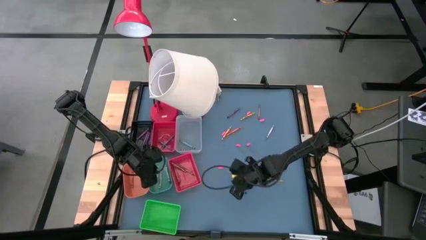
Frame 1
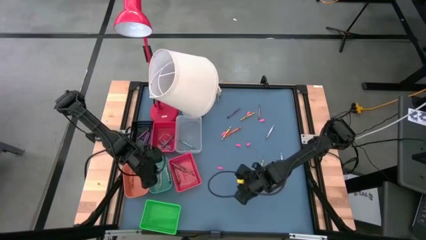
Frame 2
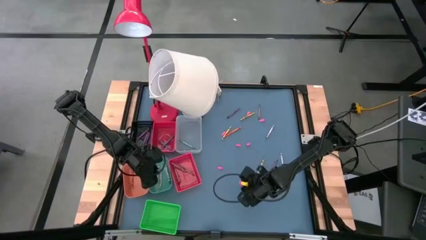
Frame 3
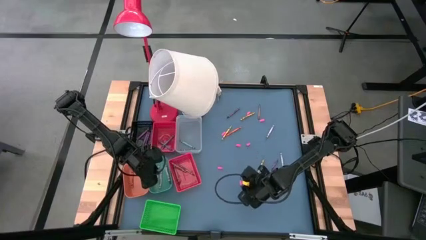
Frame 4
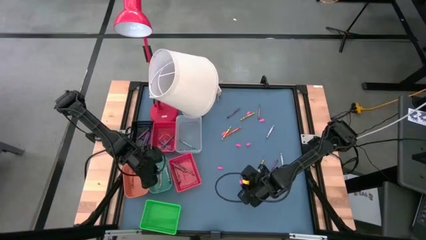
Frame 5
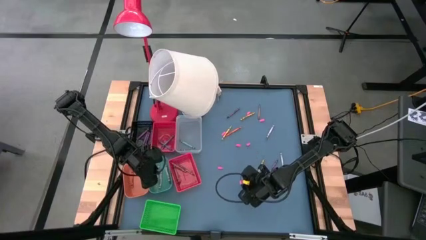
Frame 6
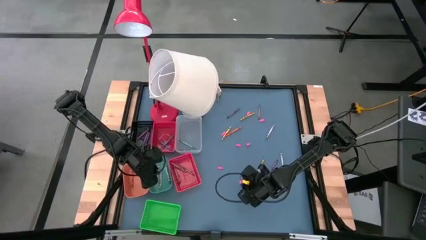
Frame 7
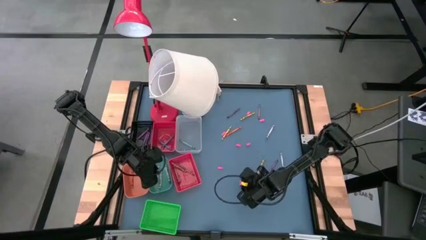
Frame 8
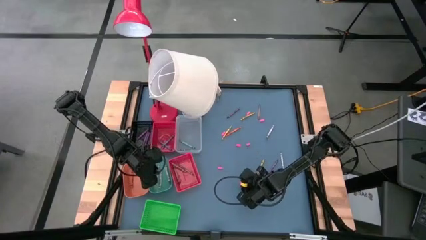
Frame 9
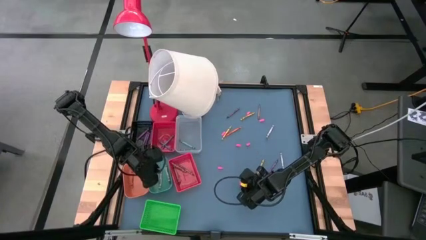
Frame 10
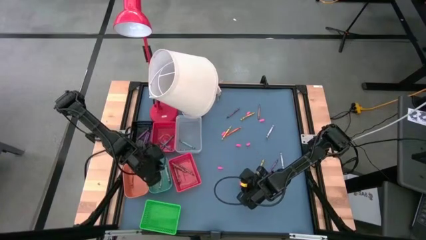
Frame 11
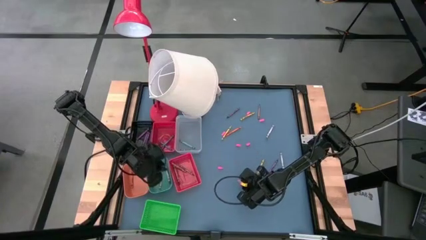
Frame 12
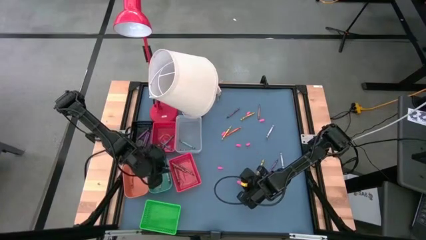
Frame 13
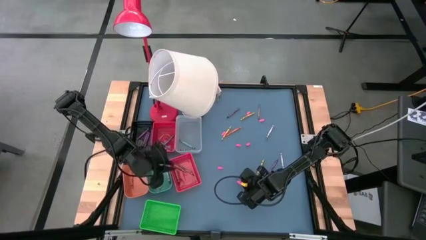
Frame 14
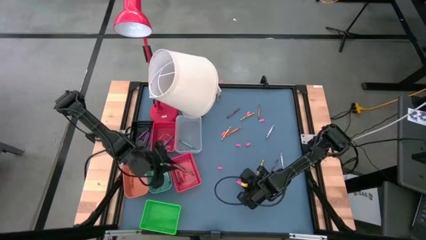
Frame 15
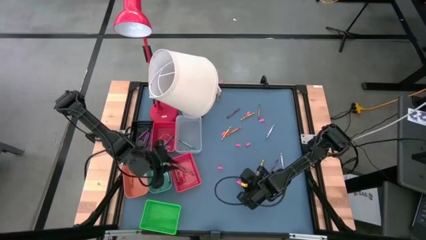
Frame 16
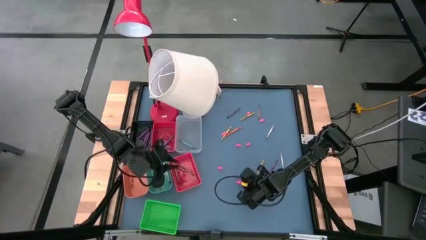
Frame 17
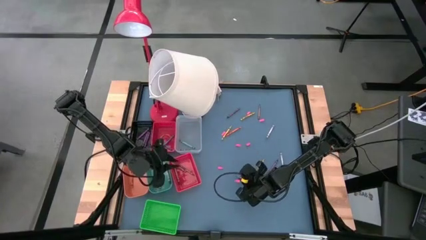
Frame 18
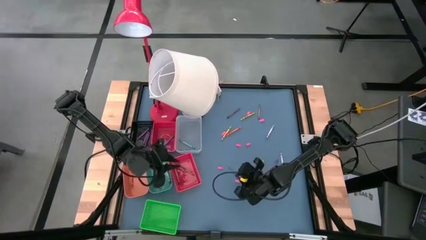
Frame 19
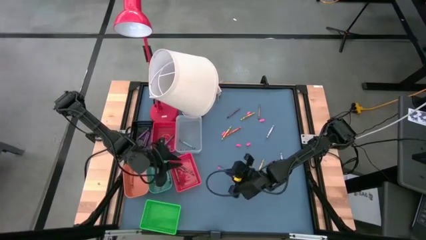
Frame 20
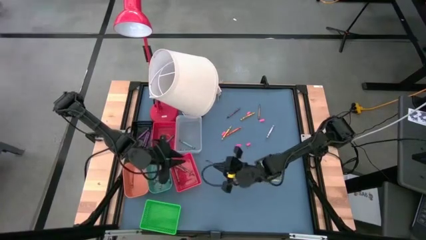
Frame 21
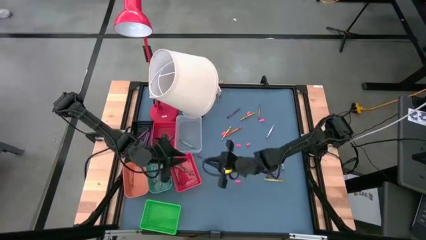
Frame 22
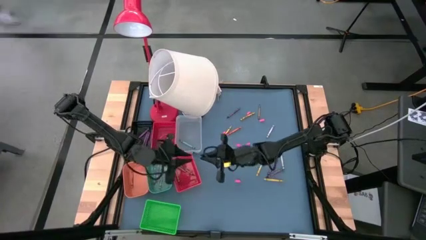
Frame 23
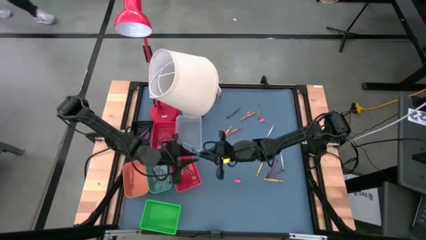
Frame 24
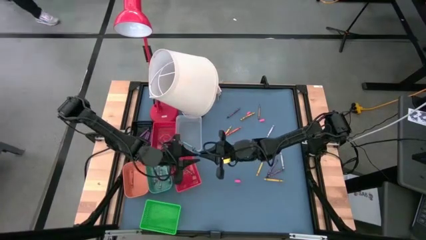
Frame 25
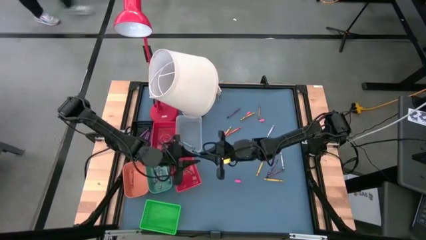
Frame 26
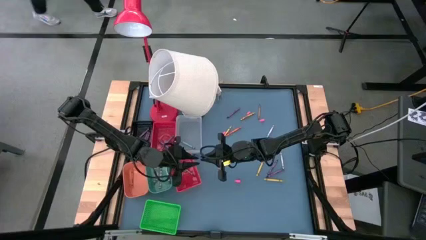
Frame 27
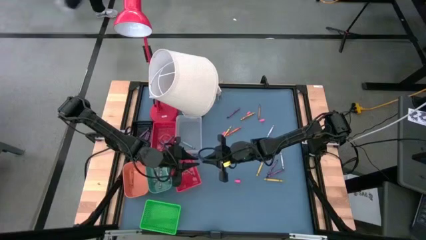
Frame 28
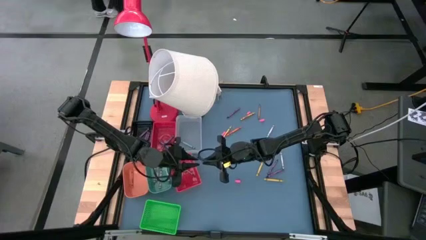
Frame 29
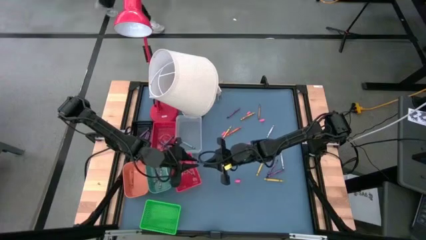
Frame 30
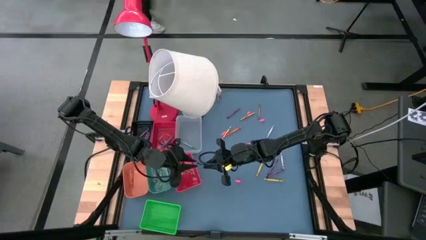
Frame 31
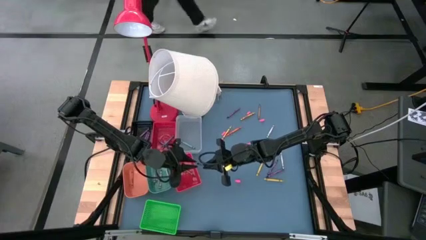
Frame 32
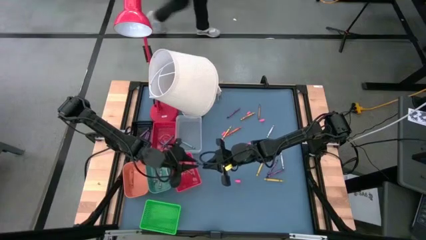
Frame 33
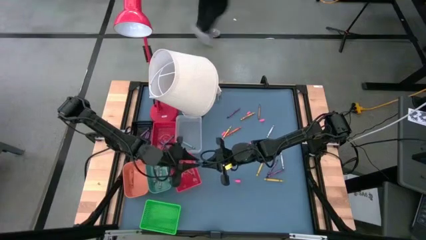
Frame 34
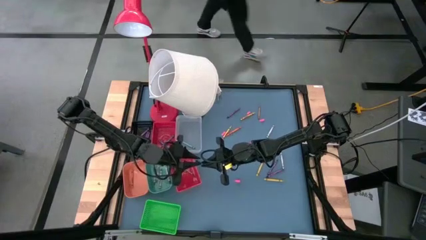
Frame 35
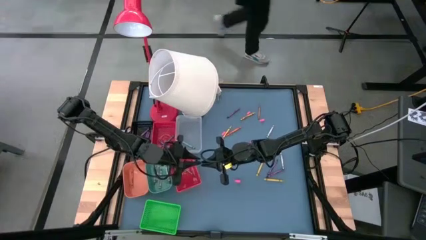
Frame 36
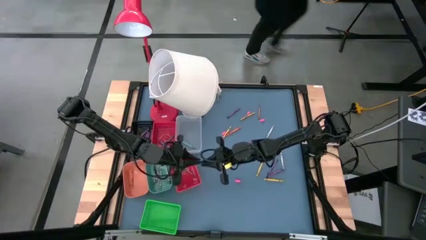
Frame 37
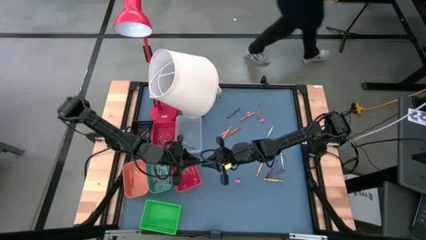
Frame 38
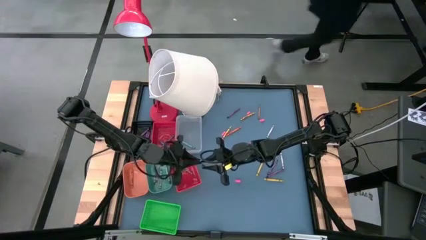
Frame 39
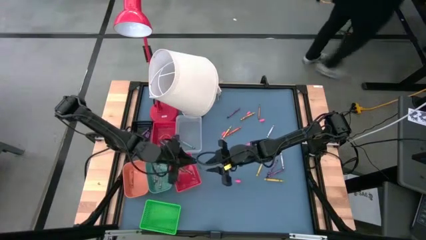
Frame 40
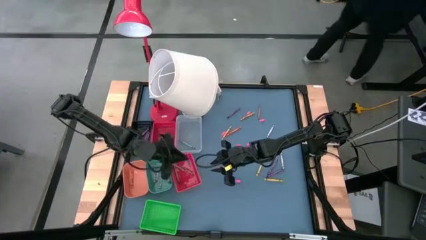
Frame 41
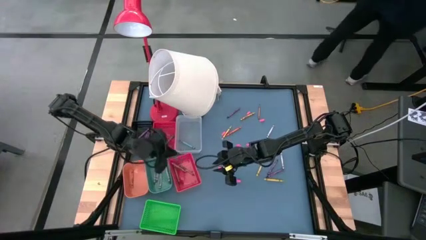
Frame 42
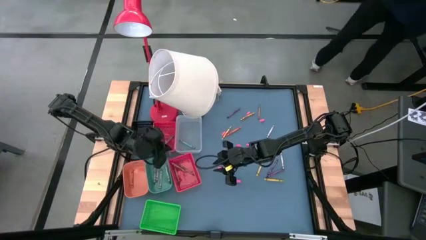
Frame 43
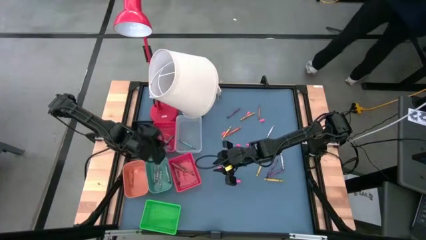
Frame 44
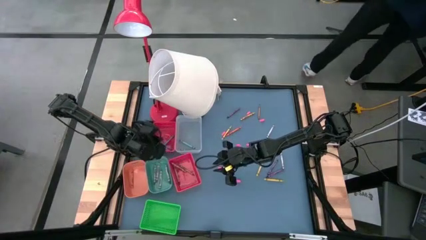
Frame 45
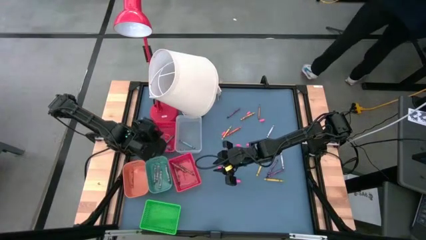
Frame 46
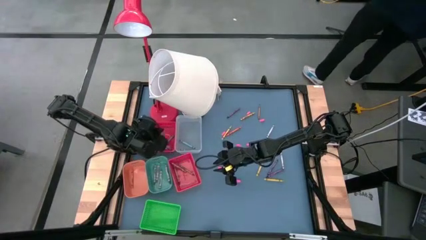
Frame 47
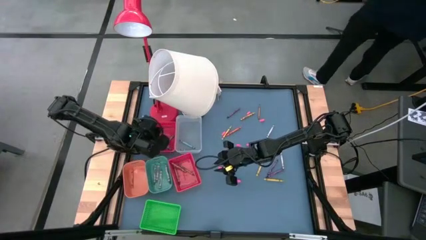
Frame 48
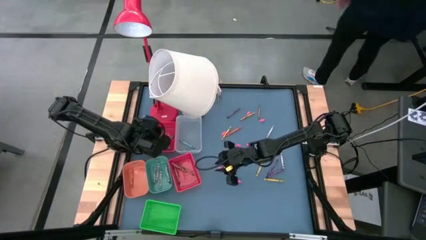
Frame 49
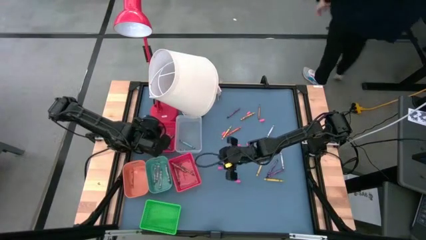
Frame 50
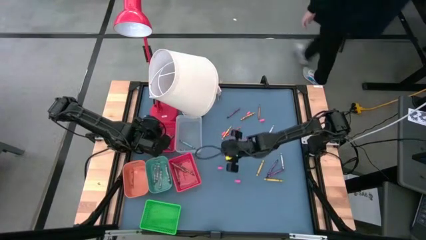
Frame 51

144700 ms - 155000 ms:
Task: Sort crayons
Put the blue crayon into the top red bin

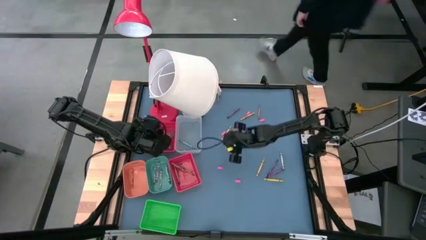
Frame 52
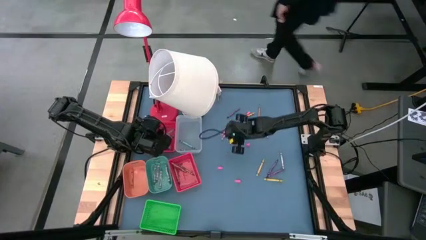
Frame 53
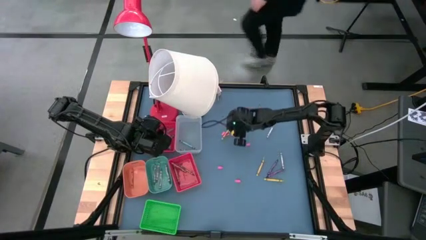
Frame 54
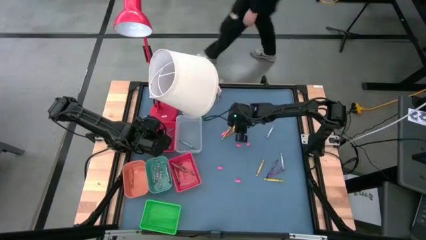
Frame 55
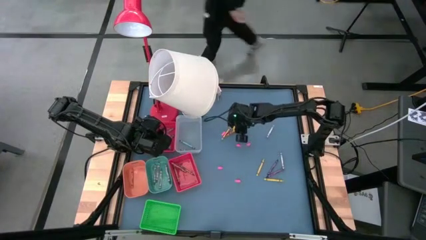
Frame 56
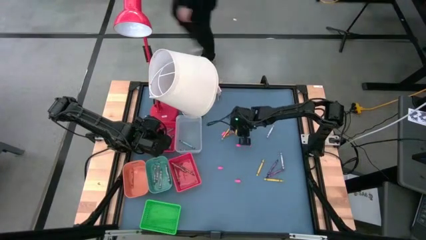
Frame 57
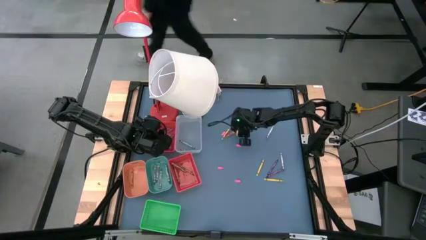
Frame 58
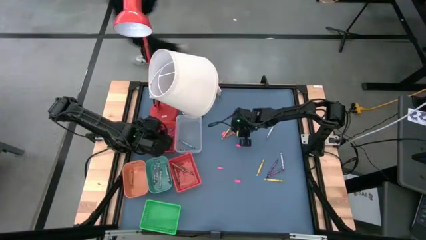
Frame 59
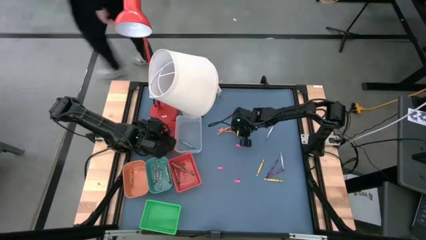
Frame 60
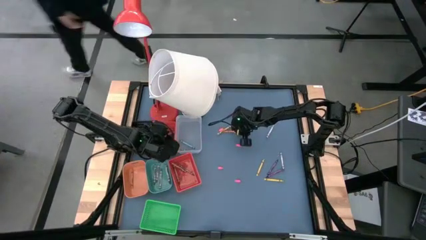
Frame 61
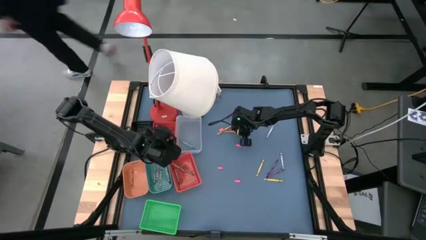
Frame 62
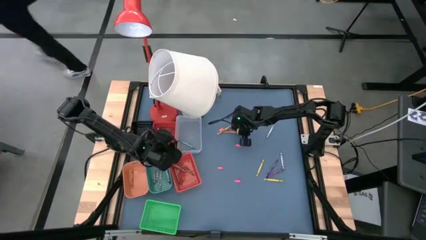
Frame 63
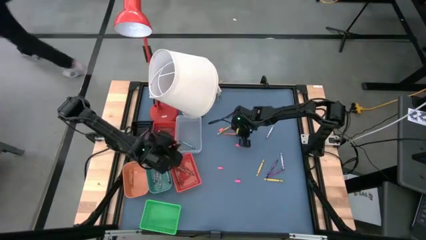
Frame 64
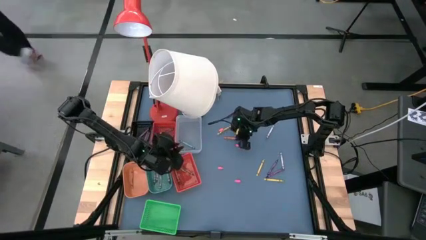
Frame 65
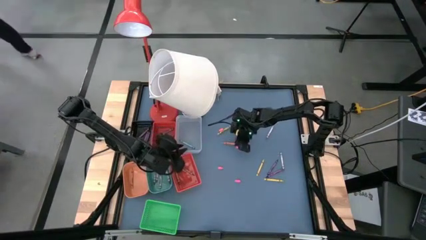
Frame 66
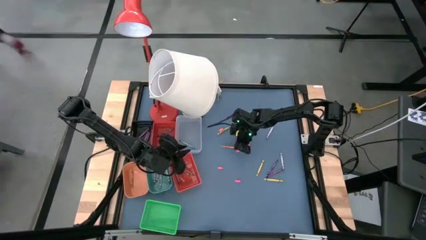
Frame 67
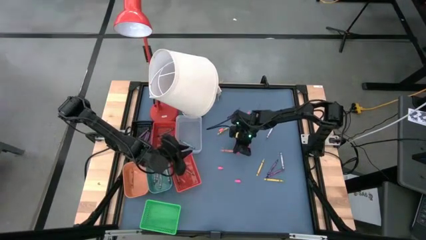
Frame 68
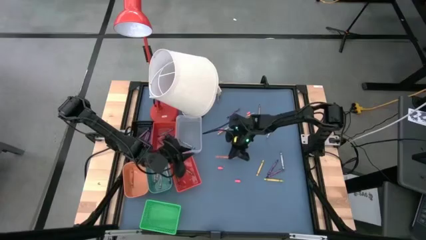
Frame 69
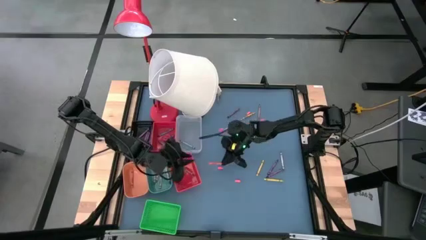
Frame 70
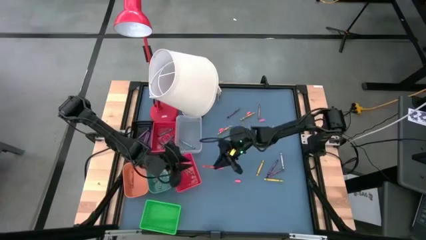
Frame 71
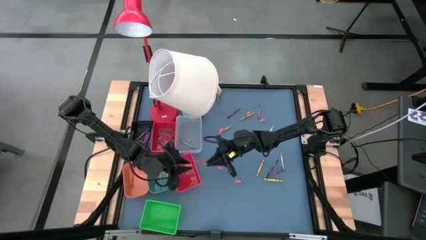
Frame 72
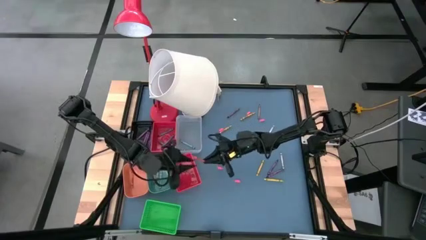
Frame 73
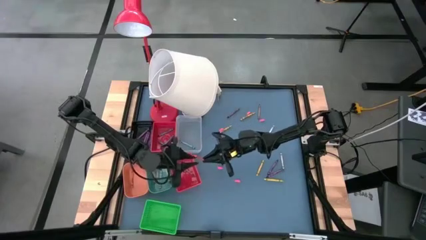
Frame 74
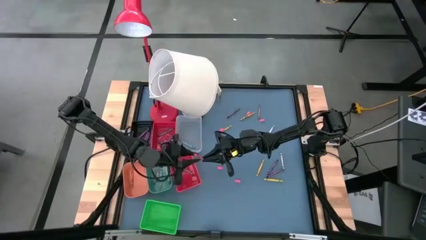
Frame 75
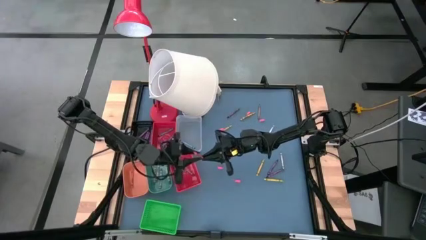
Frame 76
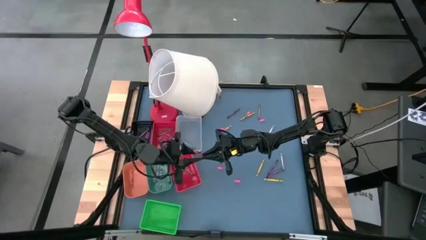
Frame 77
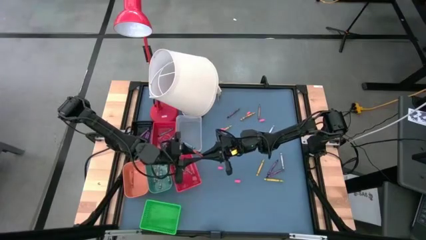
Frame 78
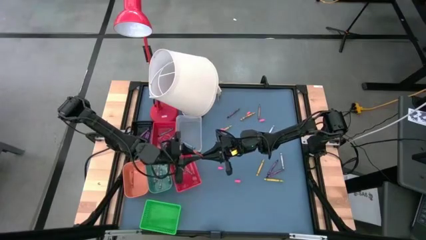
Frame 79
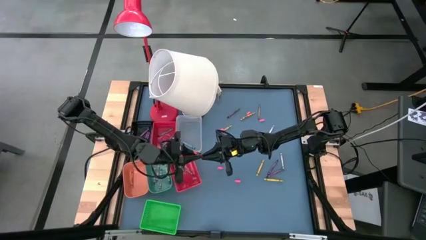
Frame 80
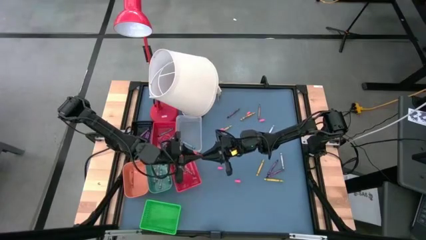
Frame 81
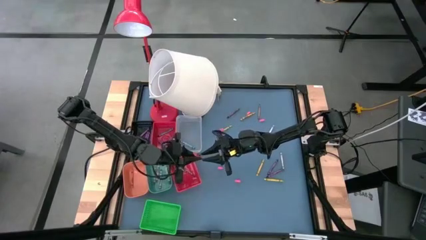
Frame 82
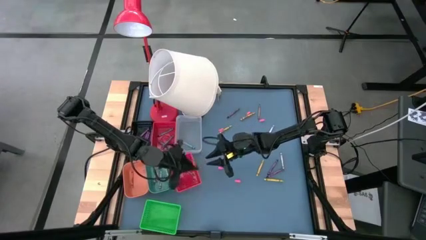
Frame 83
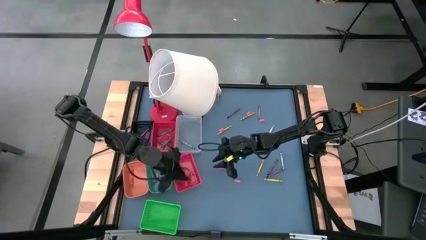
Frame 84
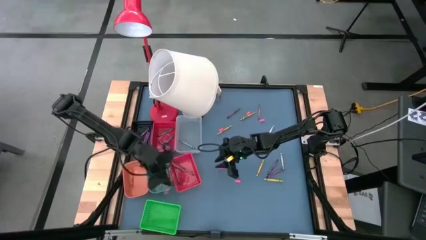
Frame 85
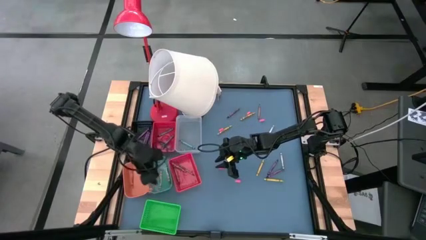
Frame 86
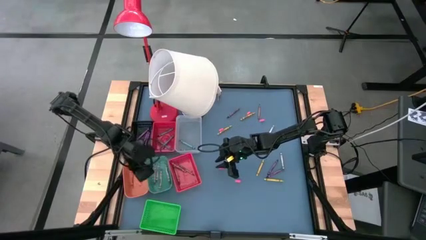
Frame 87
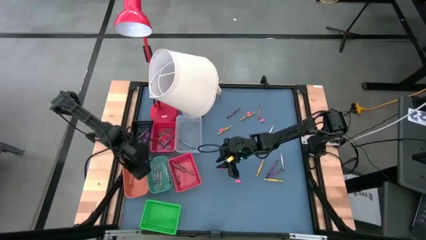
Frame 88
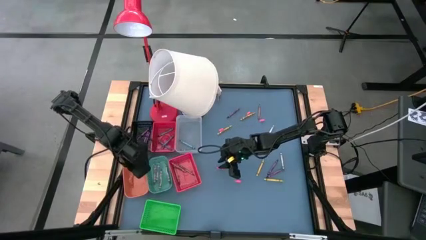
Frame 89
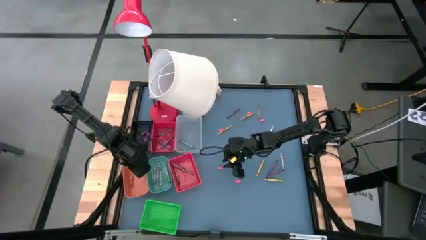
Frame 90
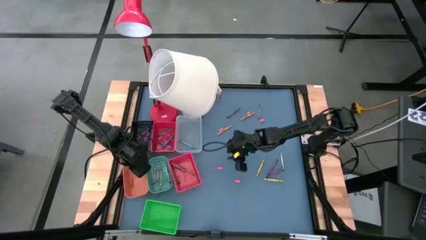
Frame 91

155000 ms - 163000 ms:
Put the orange crayon into the orange bin
